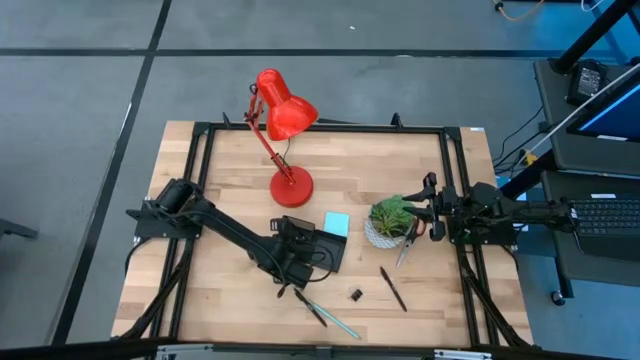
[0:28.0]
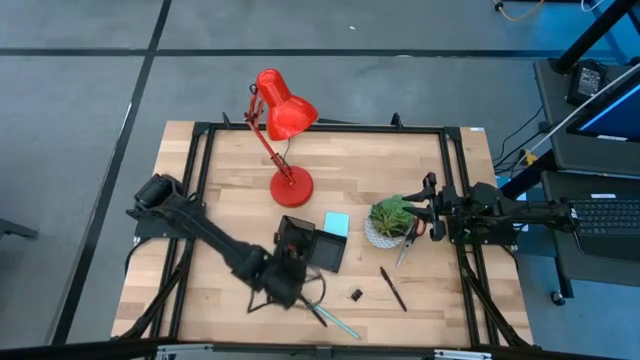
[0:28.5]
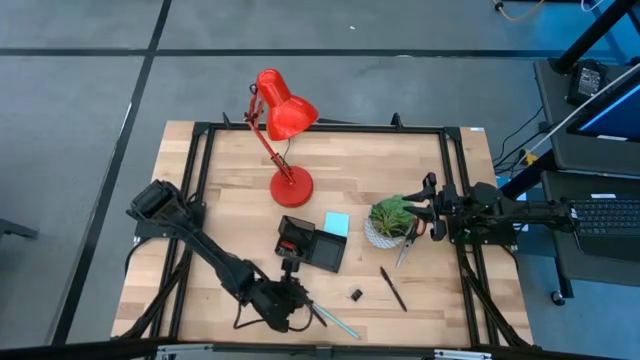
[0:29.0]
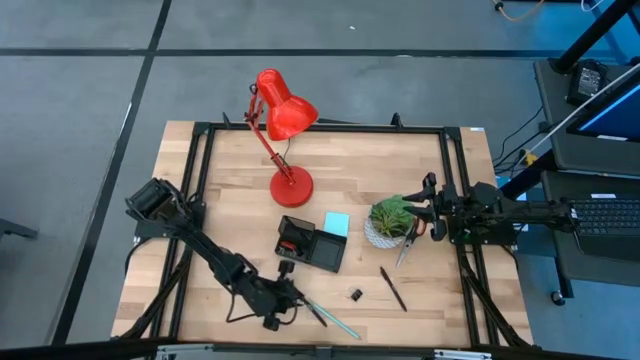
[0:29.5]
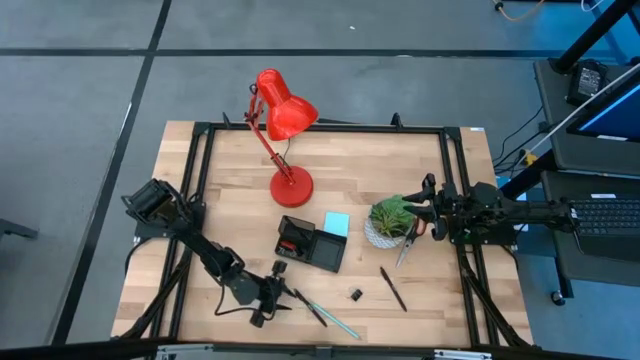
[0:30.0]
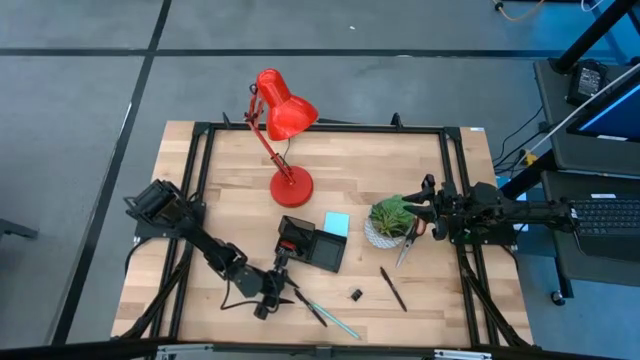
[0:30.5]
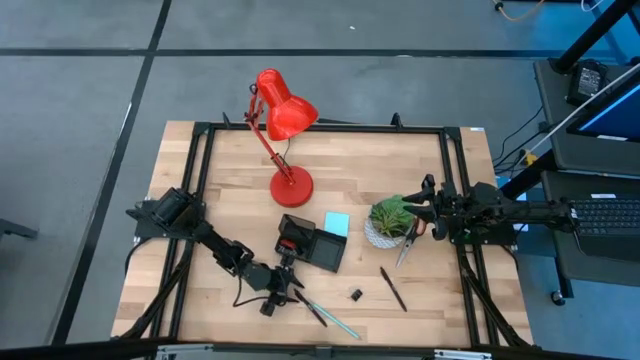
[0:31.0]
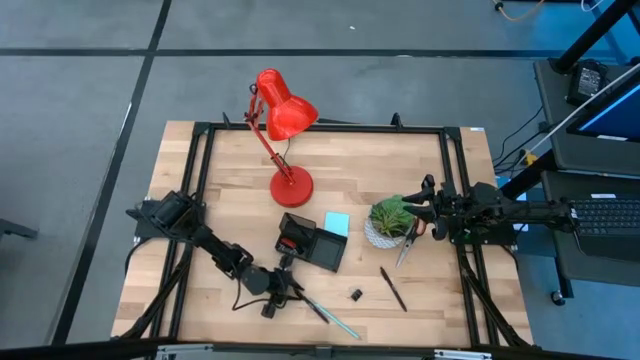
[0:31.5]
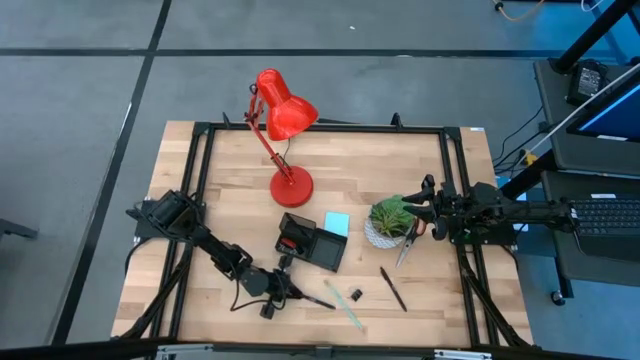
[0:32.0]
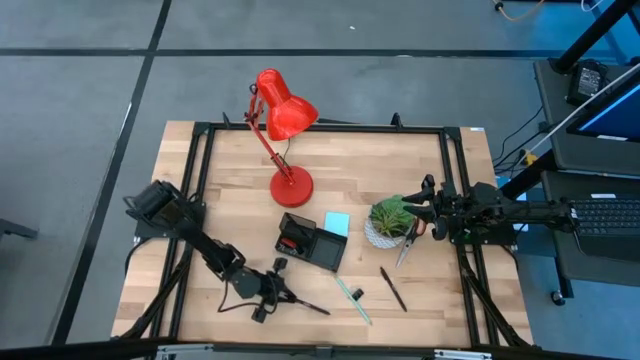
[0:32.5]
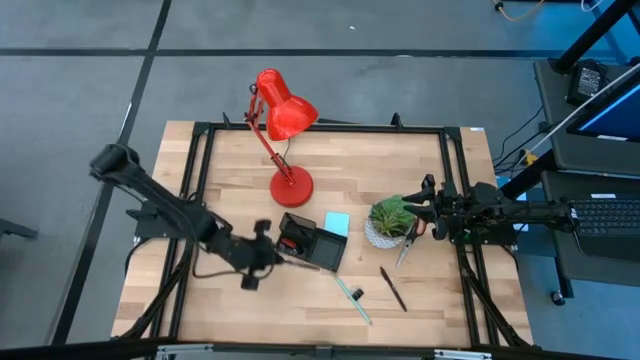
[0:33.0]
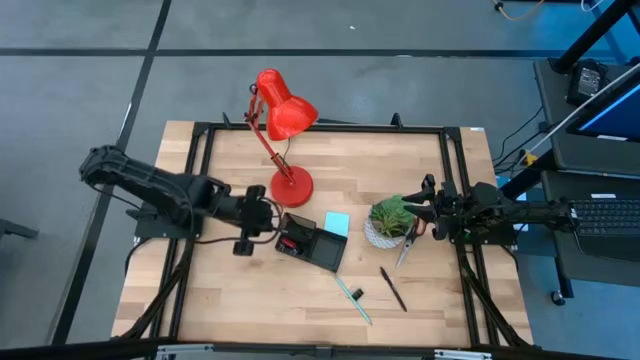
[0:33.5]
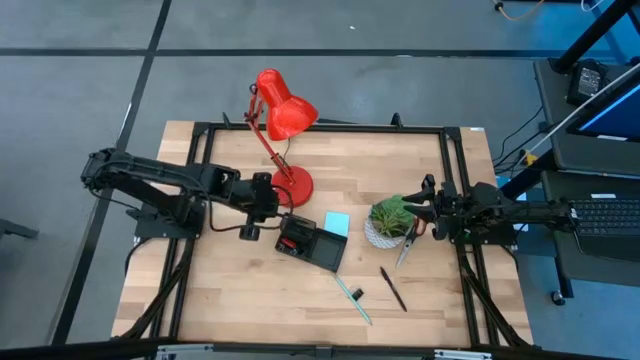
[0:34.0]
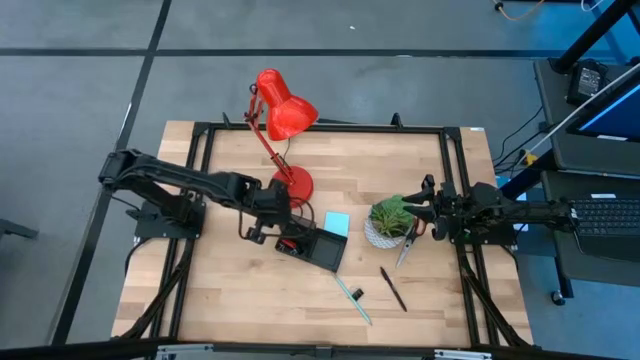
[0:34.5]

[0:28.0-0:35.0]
Task: Pick and place office supplies into organizer
Put the left black pen into the black desk organizer

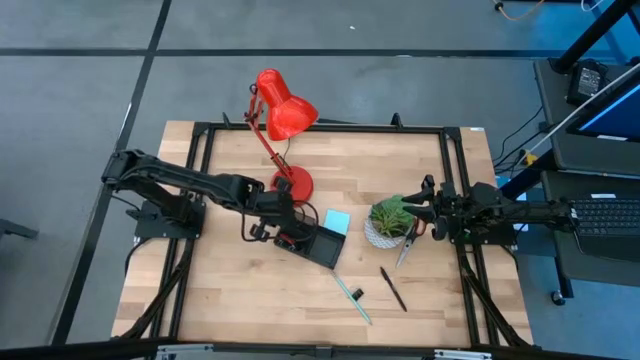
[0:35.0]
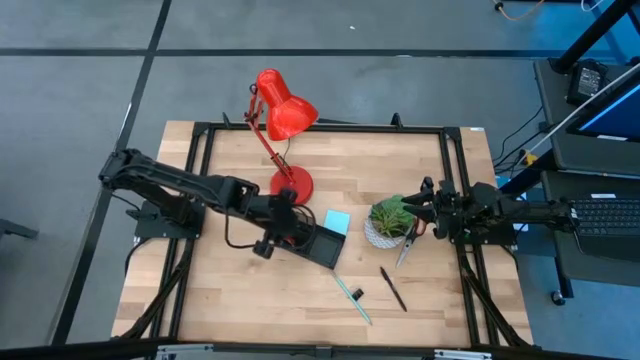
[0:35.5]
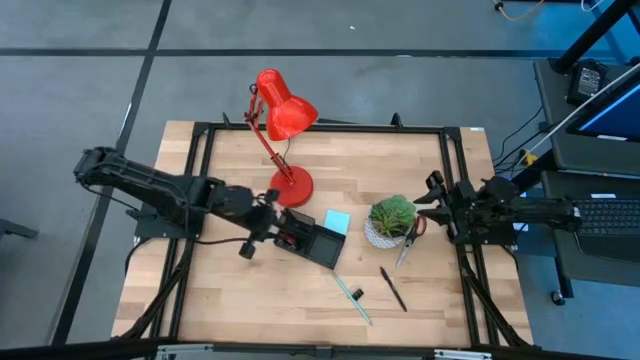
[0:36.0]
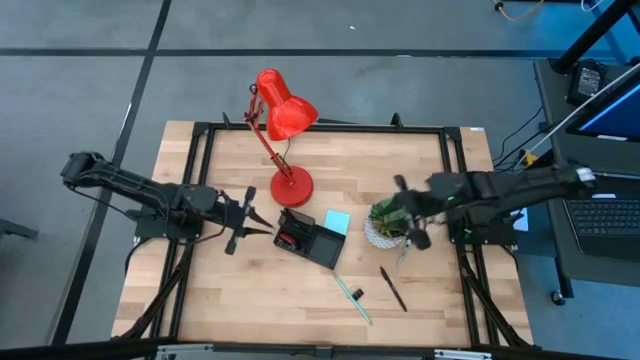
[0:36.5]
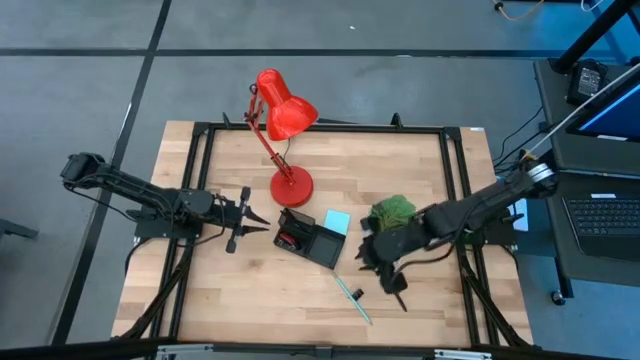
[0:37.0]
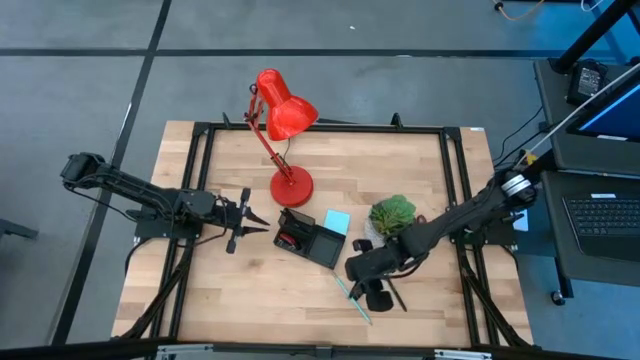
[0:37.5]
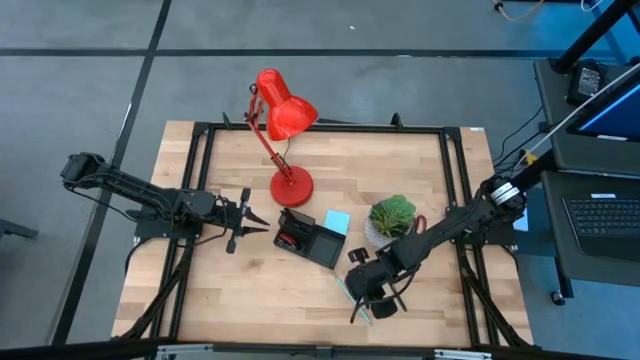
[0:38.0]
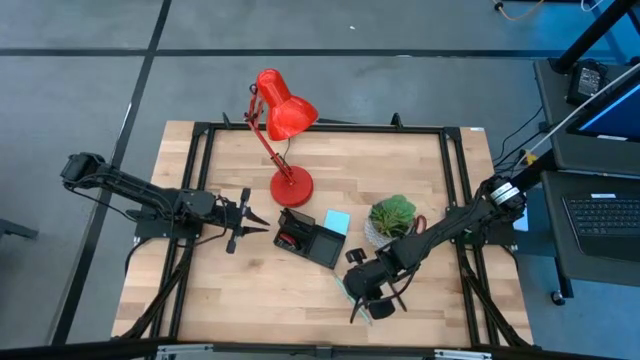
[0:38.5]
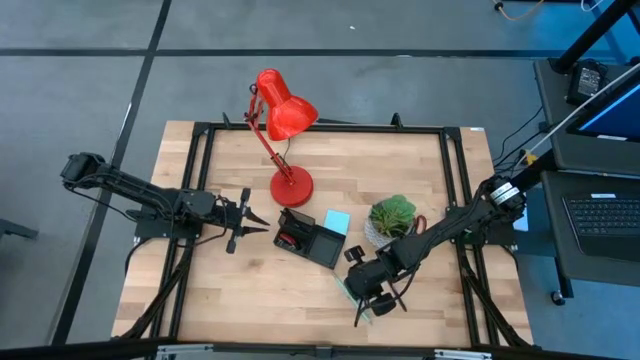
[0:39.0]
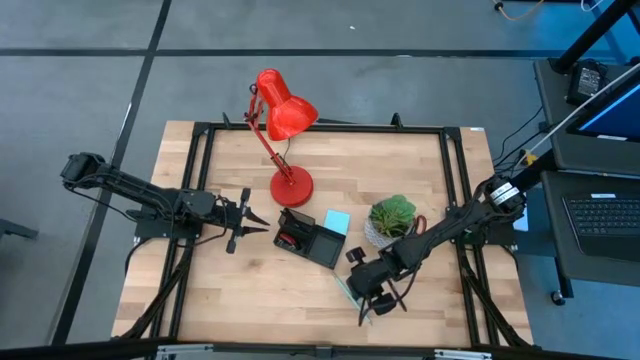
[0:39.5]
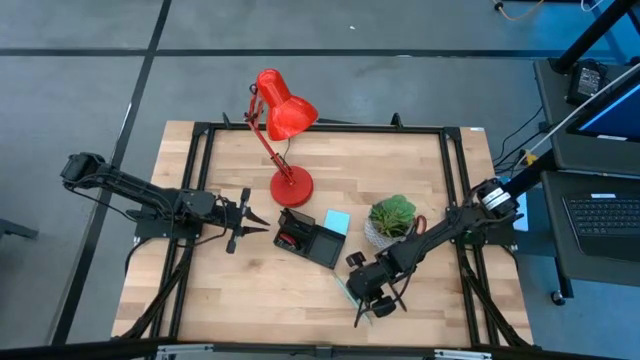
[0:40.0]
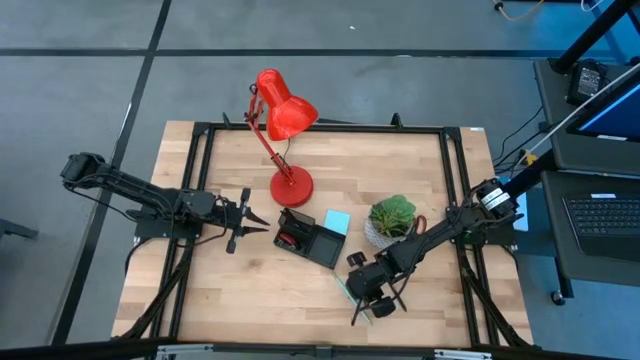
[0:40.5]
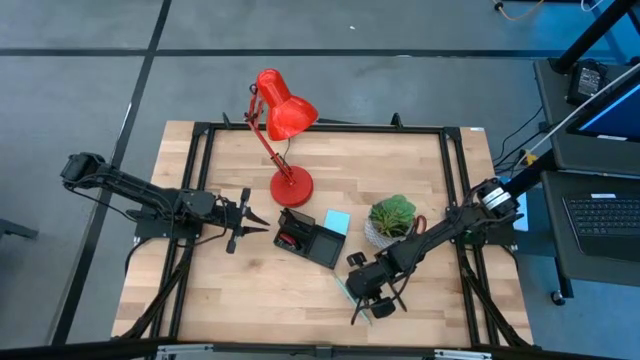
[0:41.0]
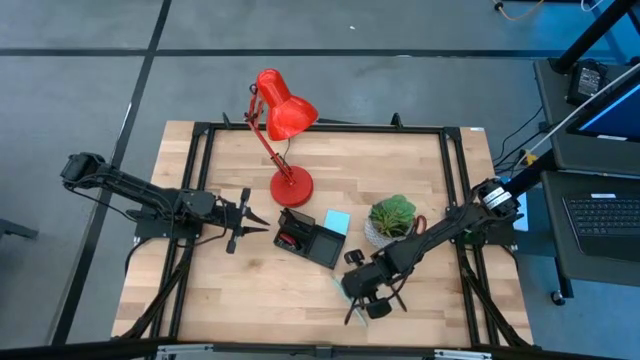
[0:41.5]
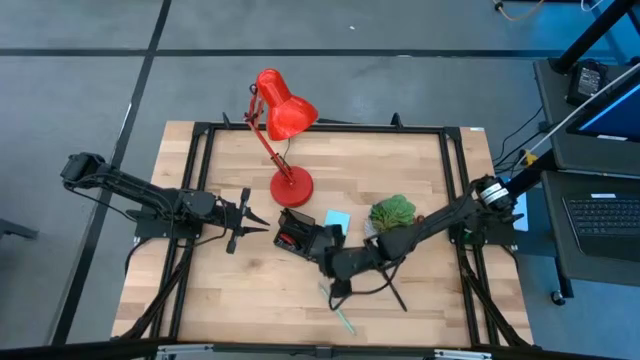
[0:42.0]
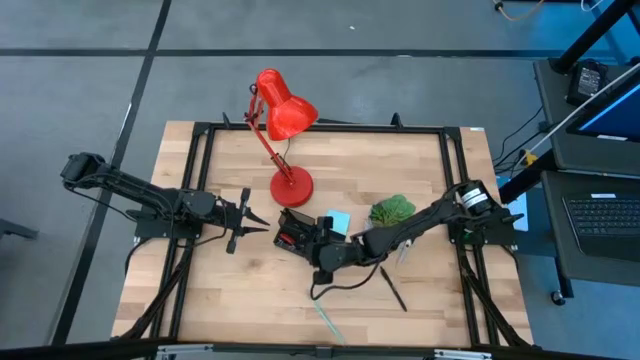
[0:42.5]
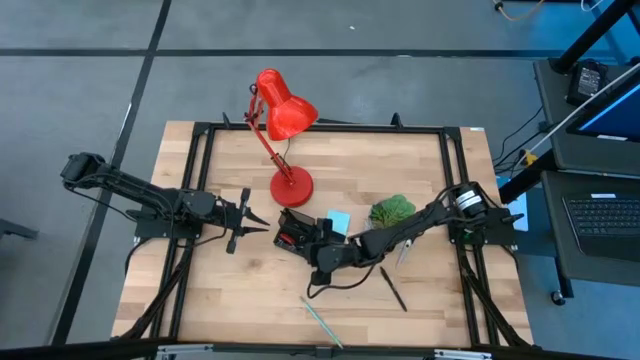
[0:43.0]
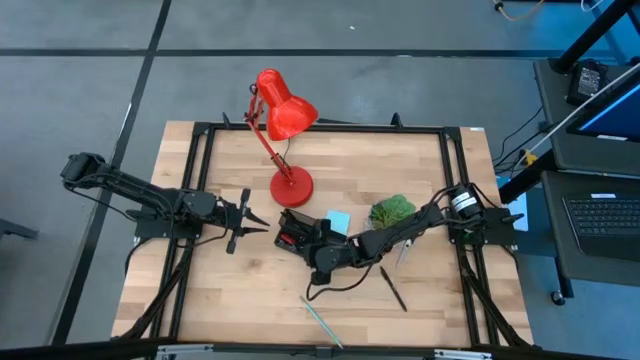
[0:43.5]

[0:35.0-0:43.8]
Put the black binder clip into the black desk organizer

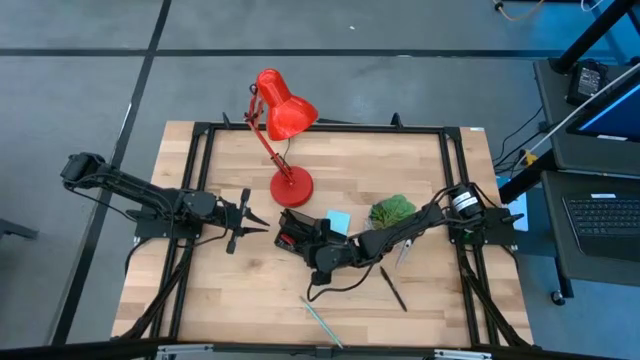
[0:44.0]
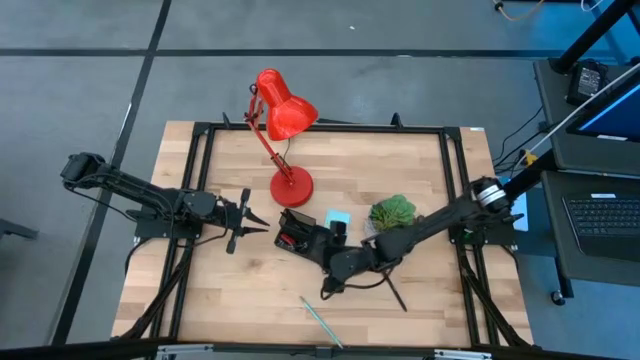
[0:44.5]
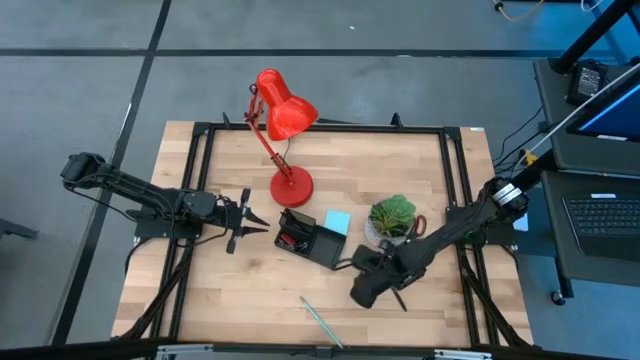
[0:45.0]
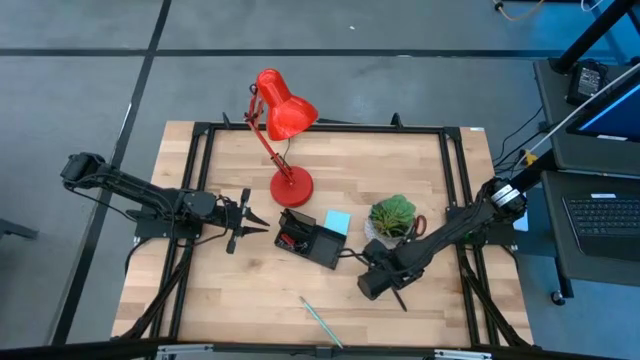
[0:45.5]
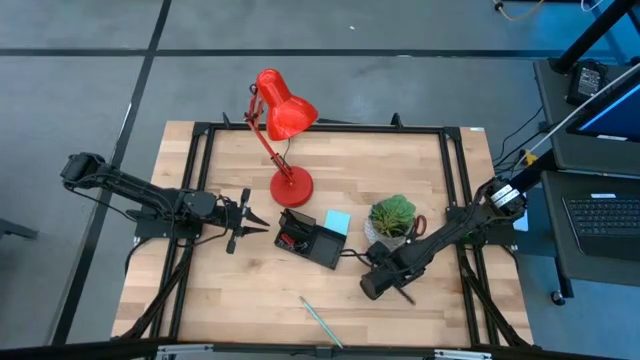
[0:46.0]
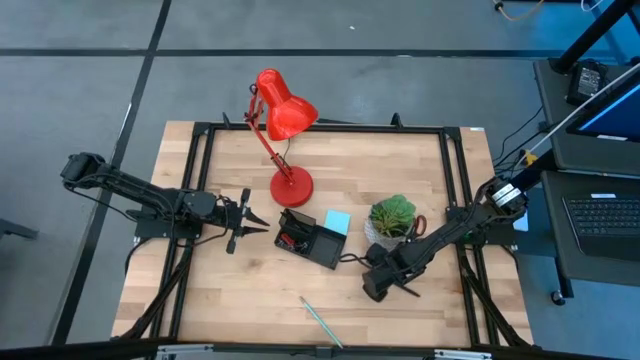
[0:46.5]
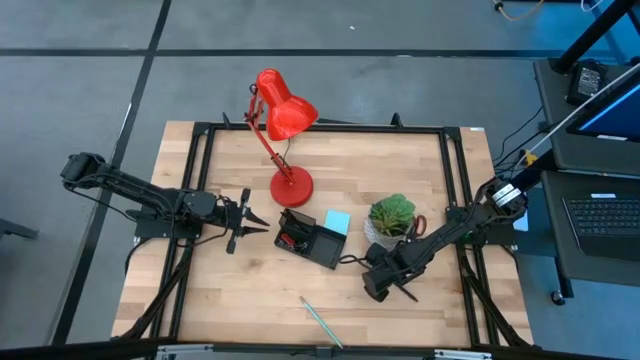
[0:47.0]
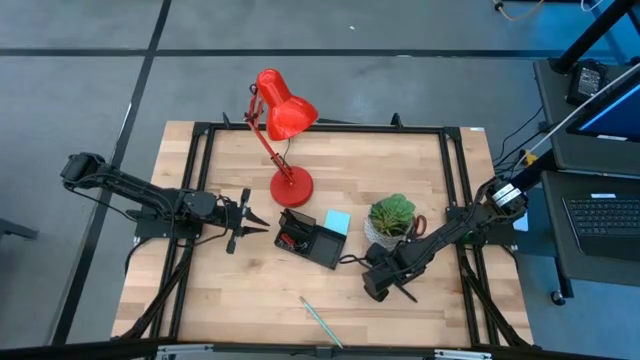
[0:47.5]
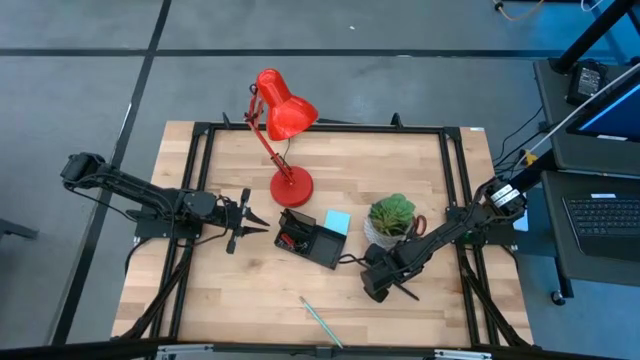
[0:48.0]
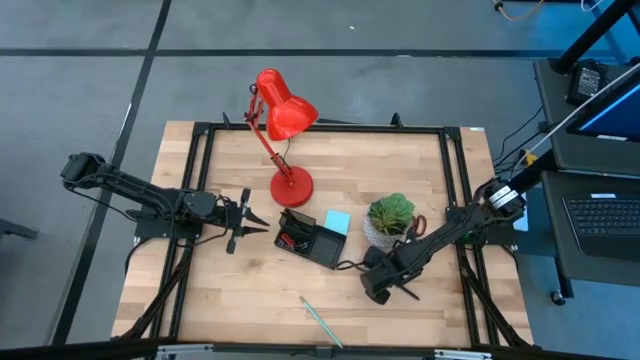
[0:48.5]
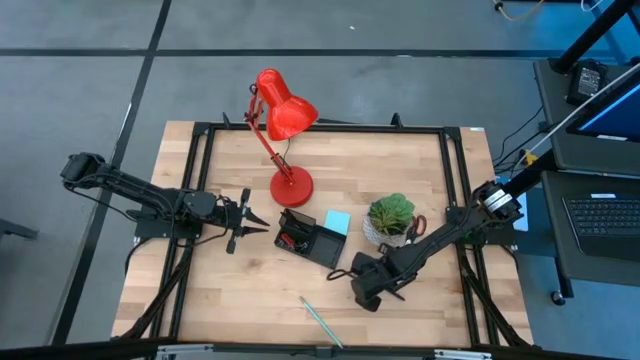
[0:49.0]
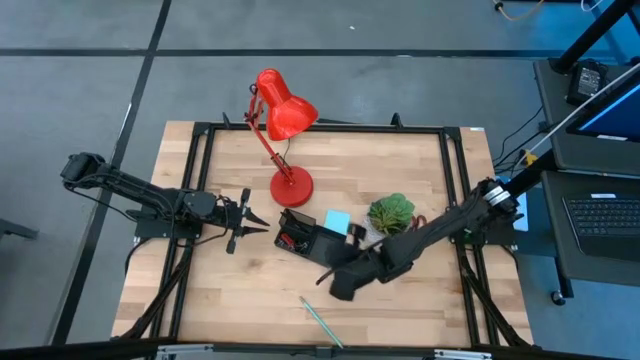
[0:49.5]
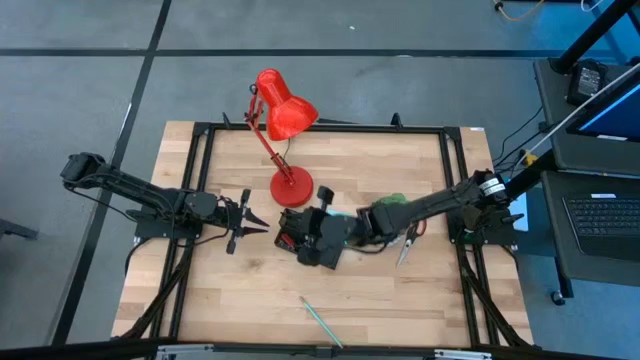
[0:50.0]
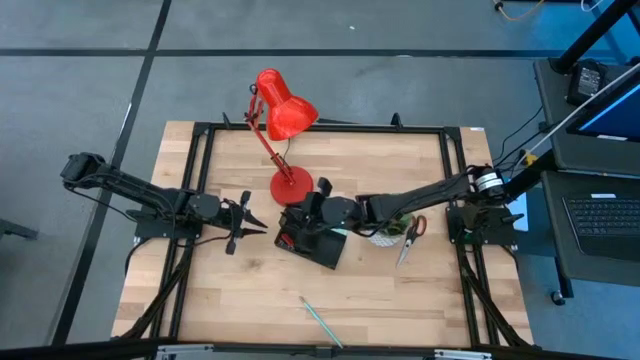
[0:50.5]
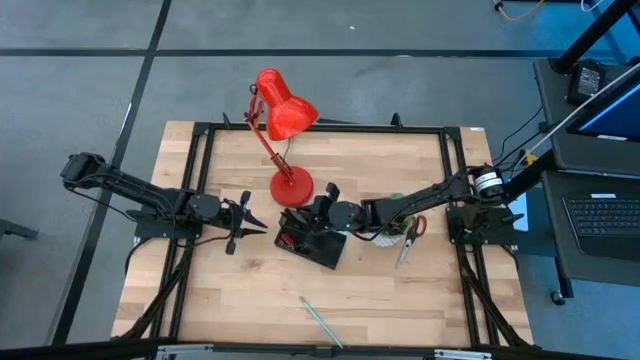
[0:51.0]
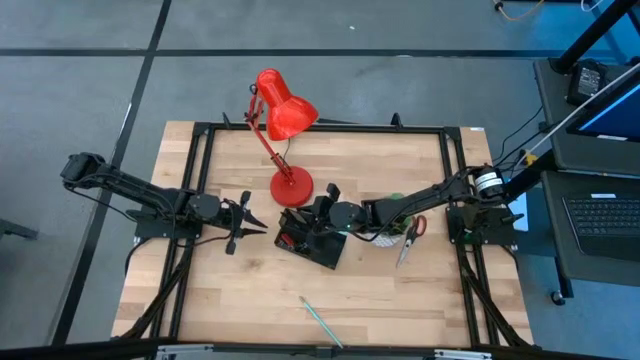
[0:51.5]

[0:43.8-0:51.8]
Put the black pen into the black desk organizer
